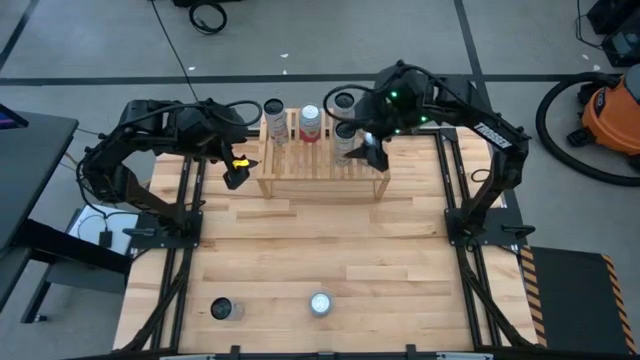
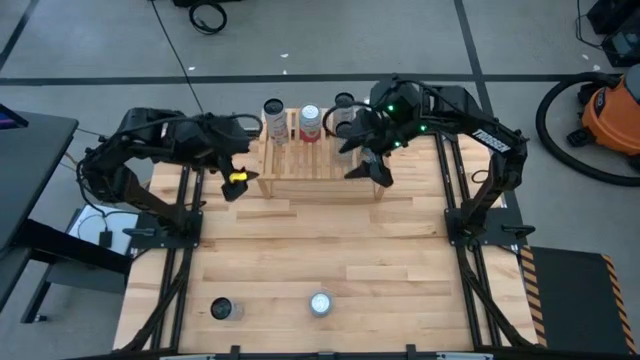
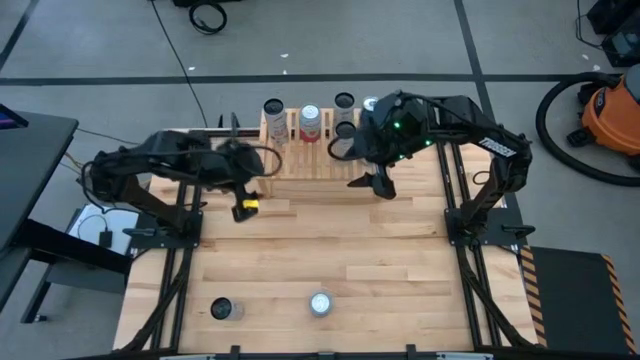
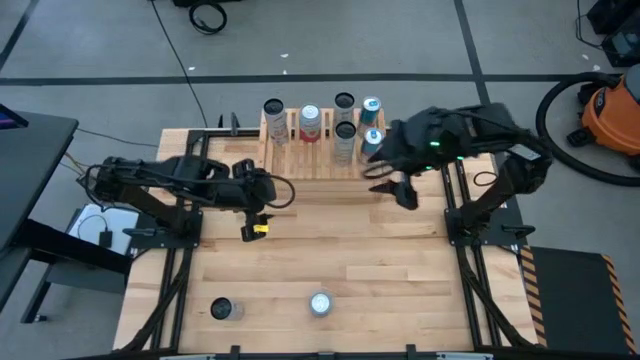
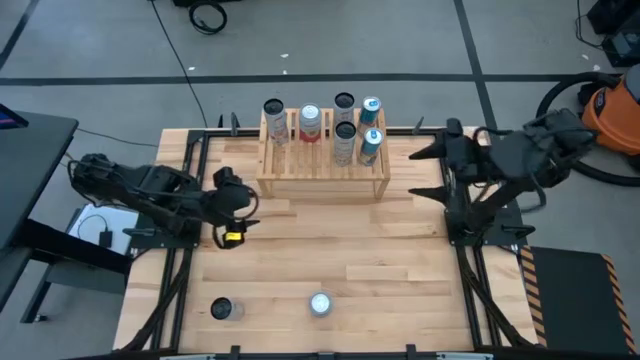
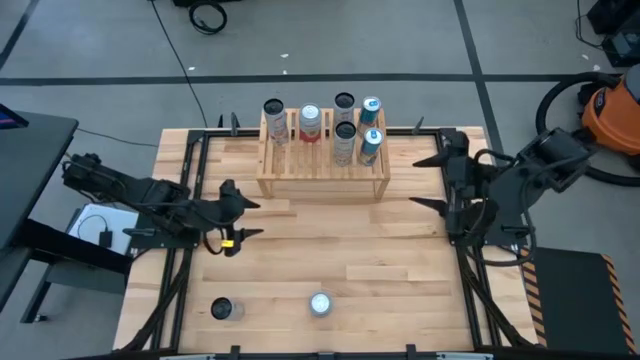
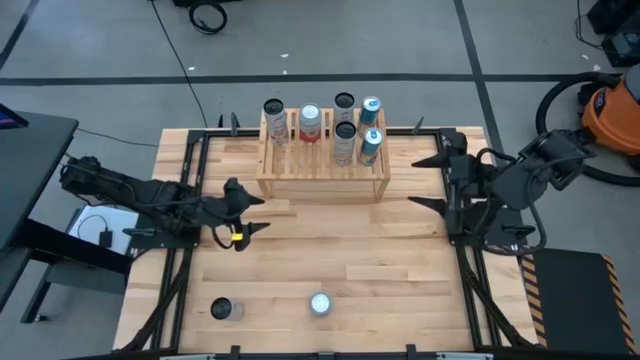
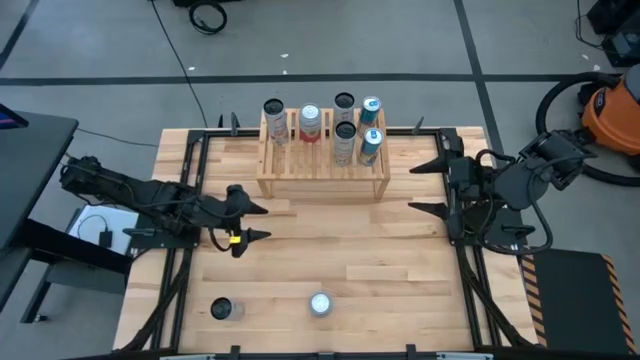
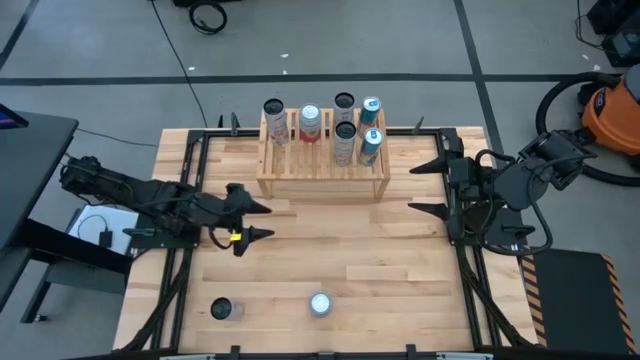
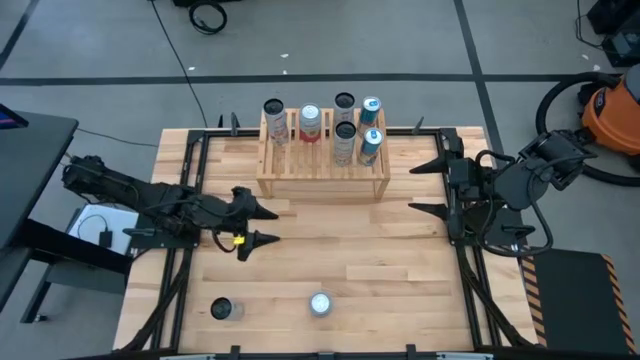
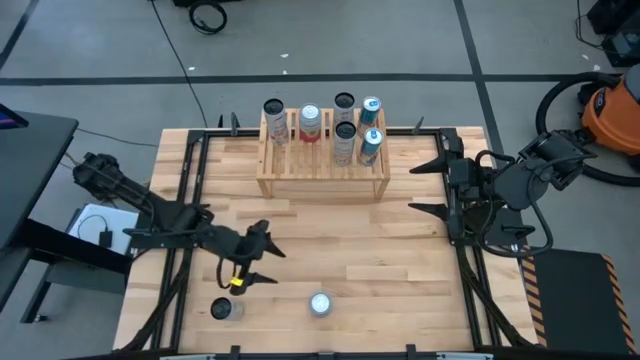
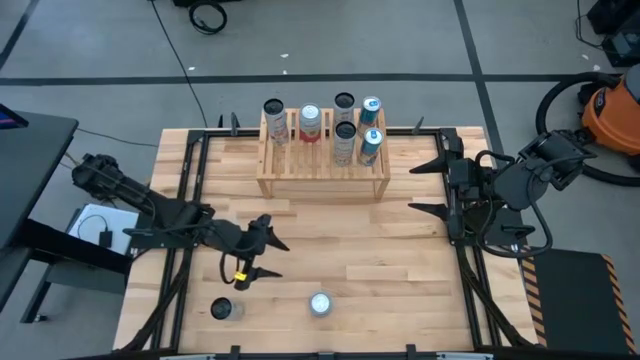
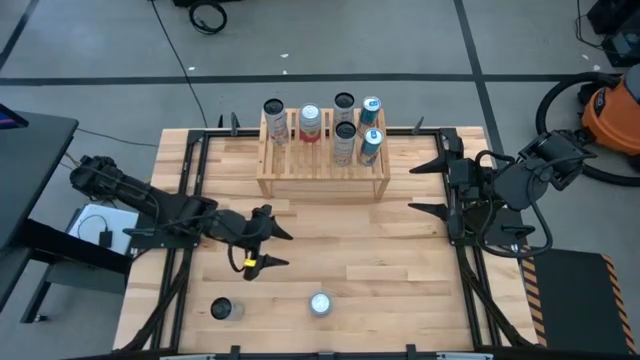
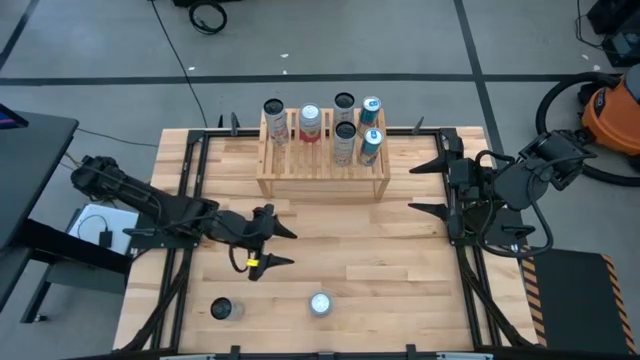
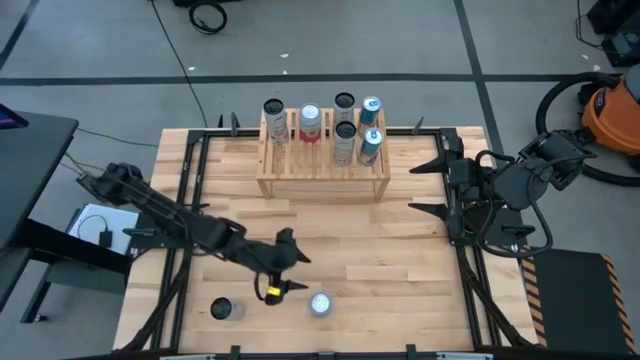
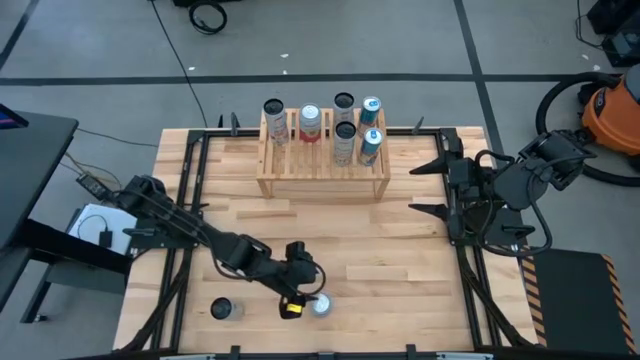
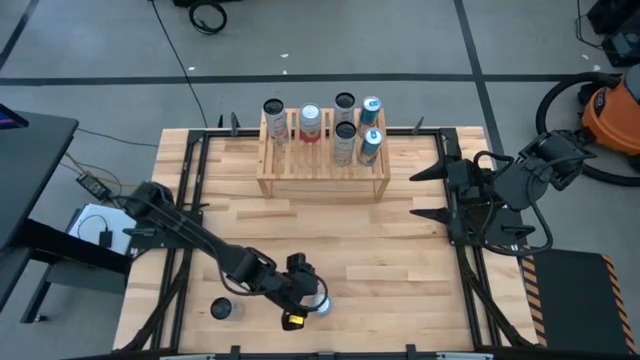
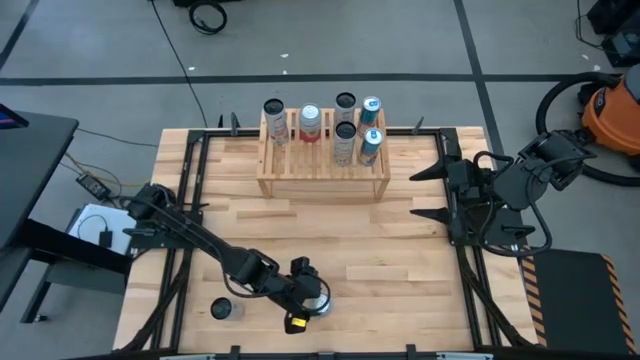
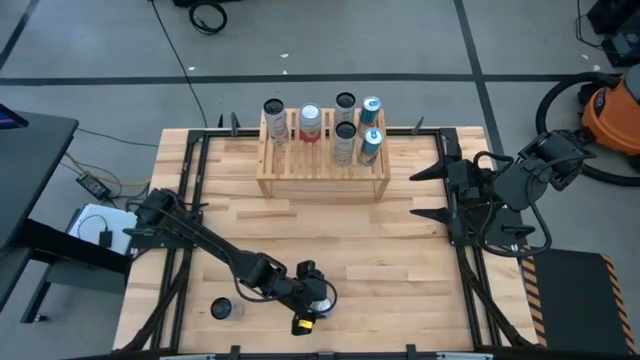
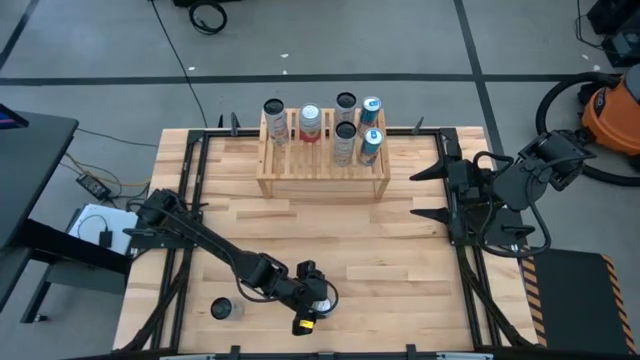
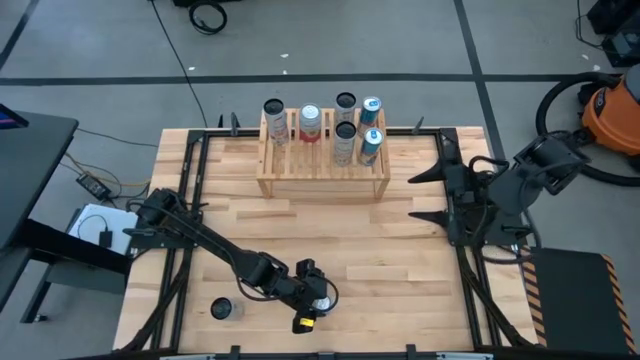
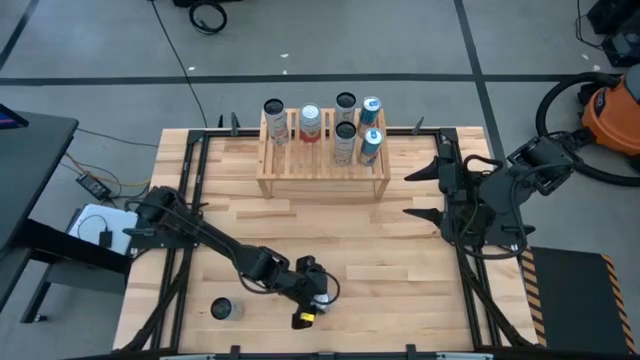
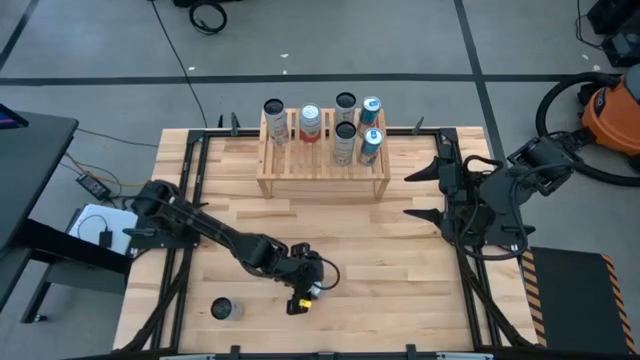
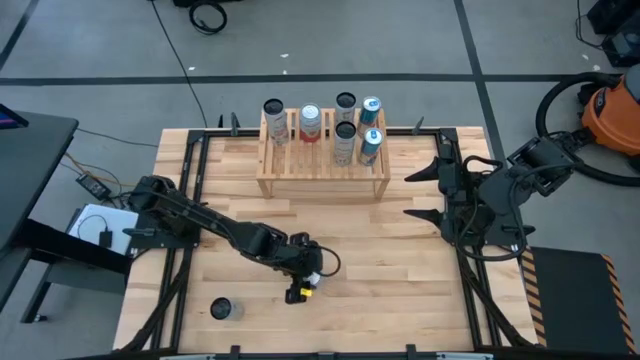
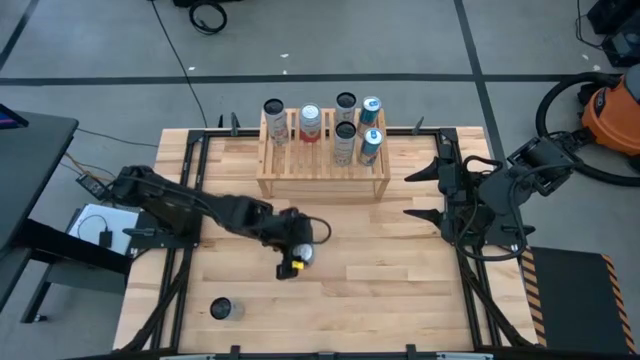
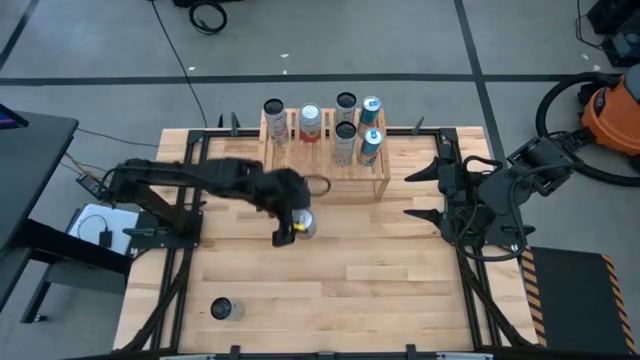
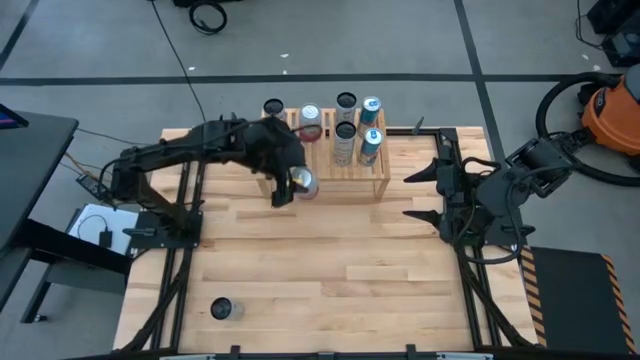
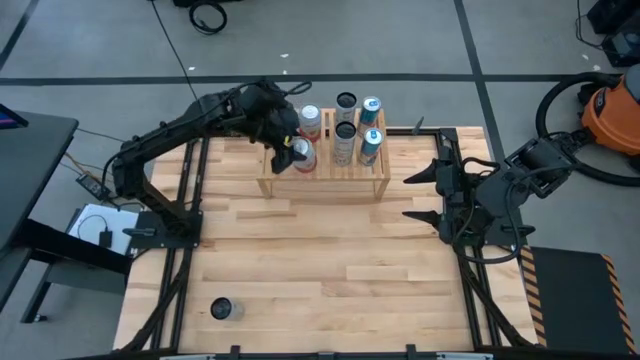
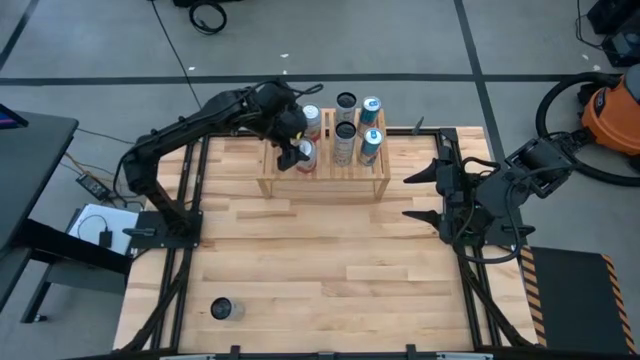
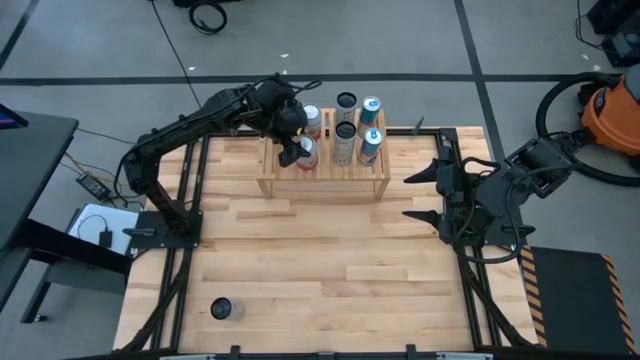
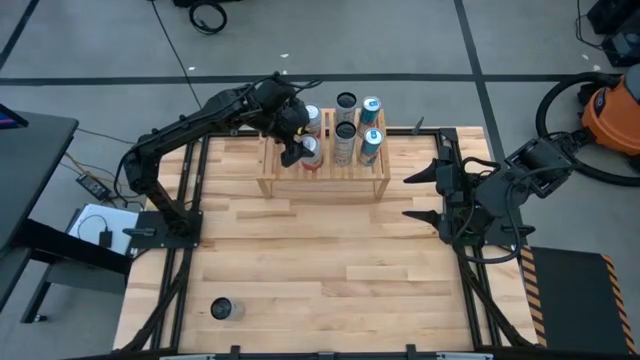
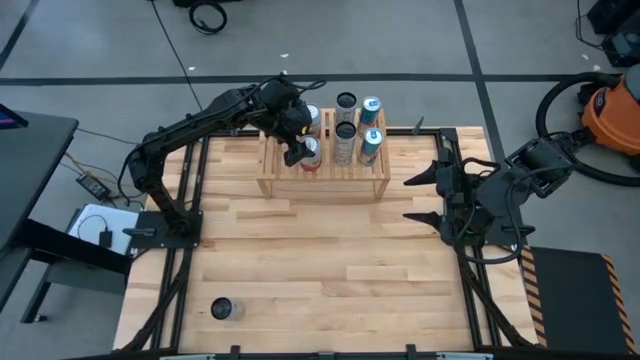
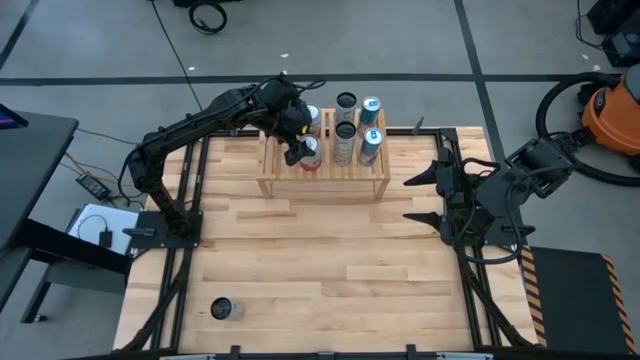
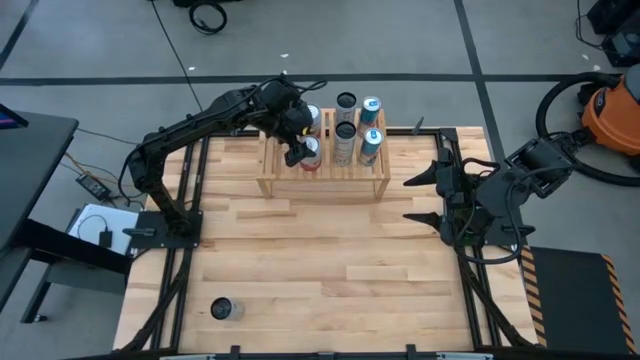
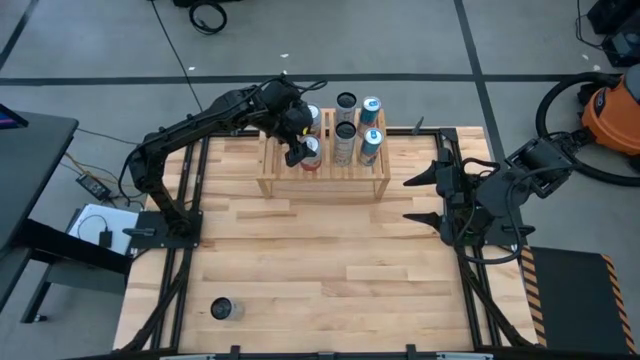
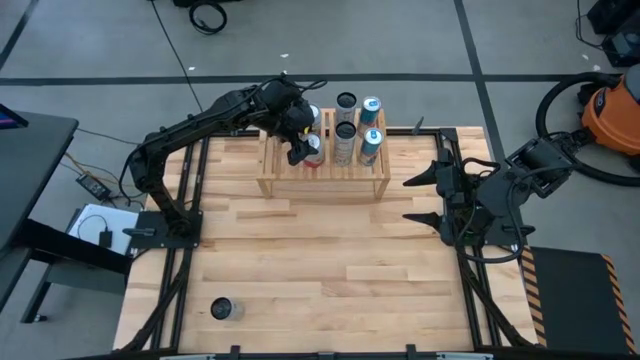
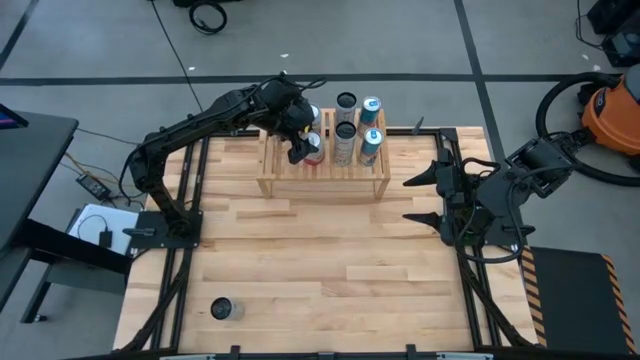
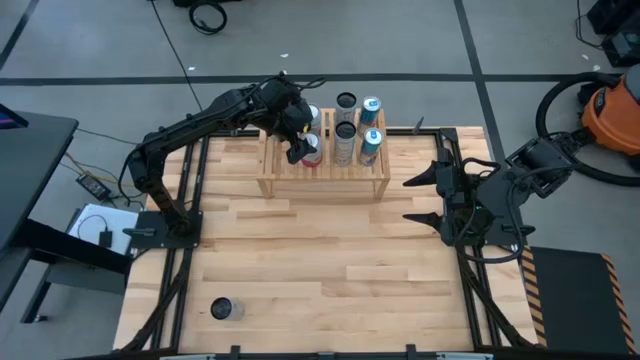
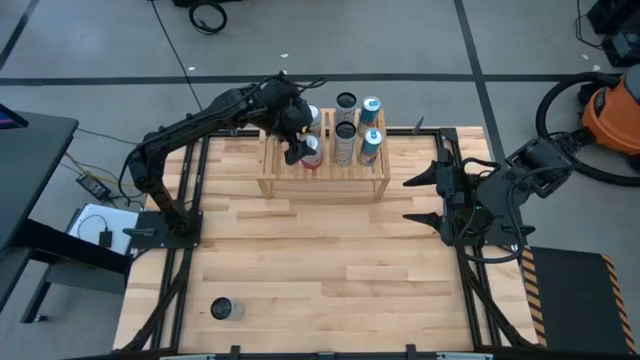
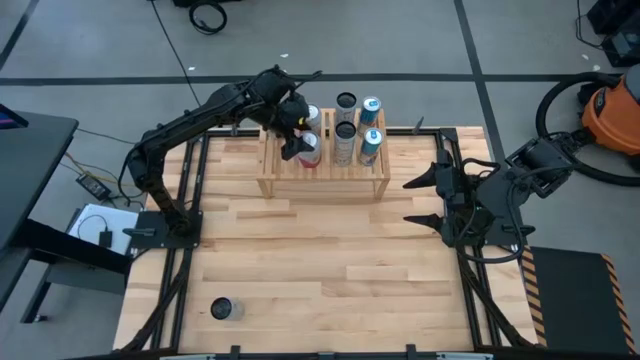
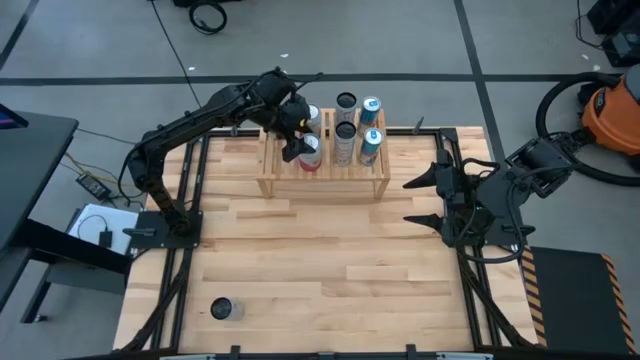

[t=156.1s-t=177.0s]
Task: Place canned beverage on shelf
Put the pink and white soda can on the shelf aligned with the other pink and white soda can
